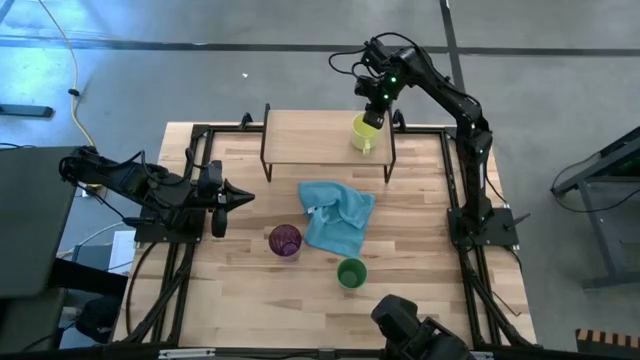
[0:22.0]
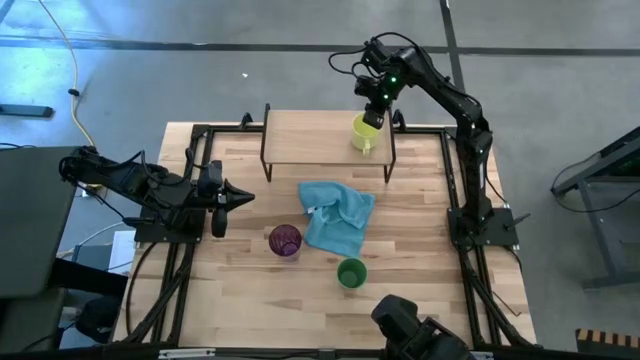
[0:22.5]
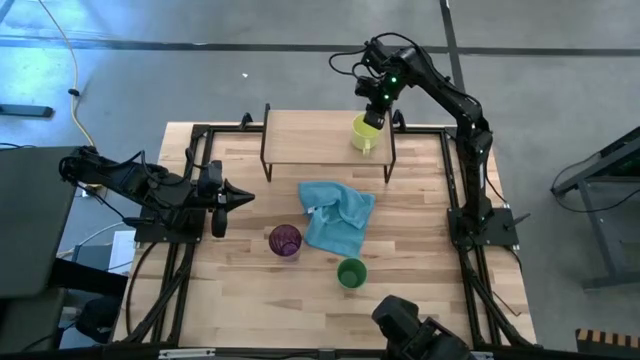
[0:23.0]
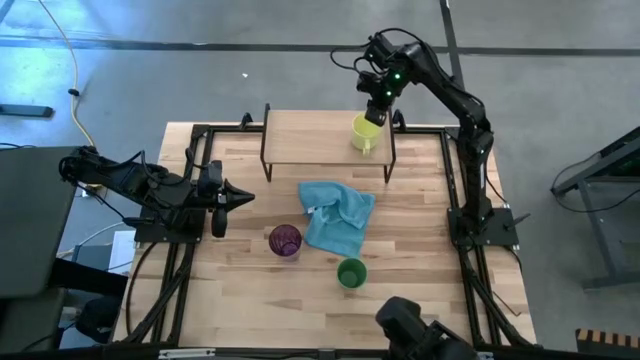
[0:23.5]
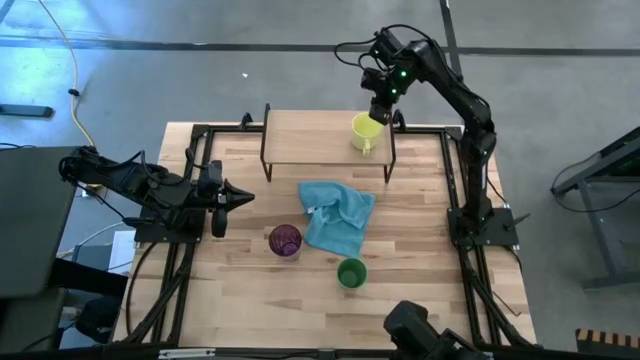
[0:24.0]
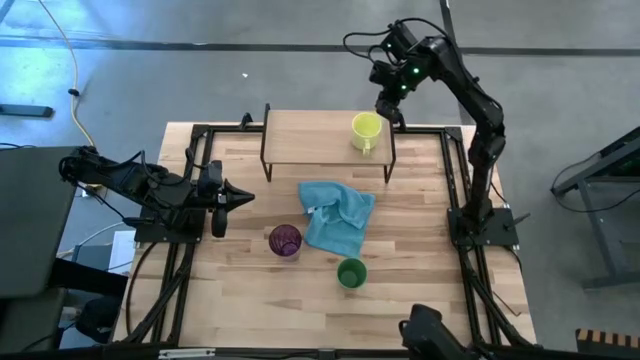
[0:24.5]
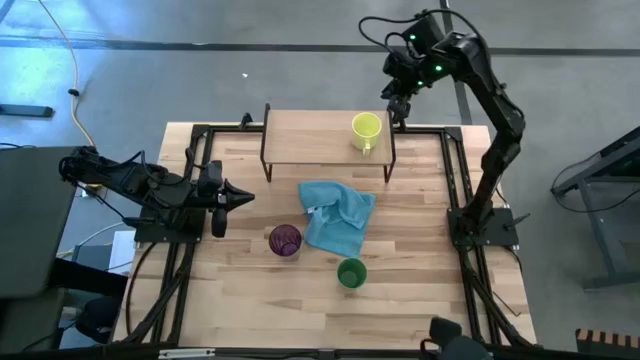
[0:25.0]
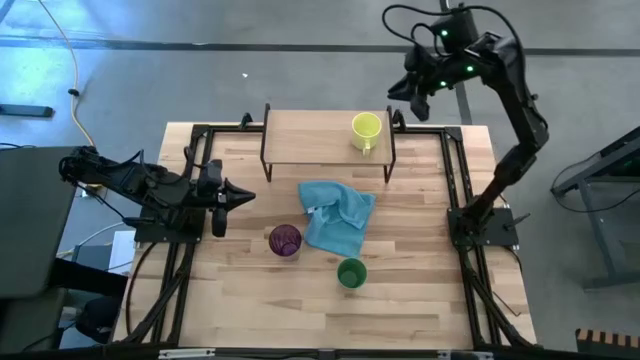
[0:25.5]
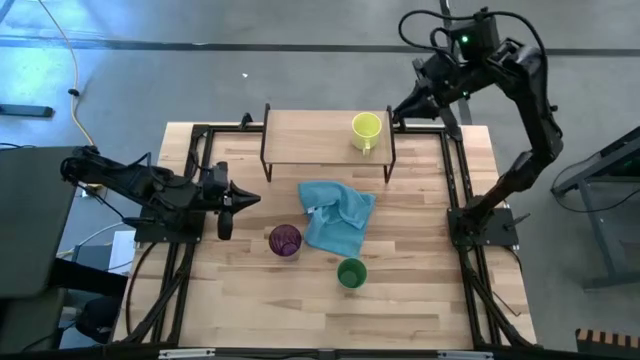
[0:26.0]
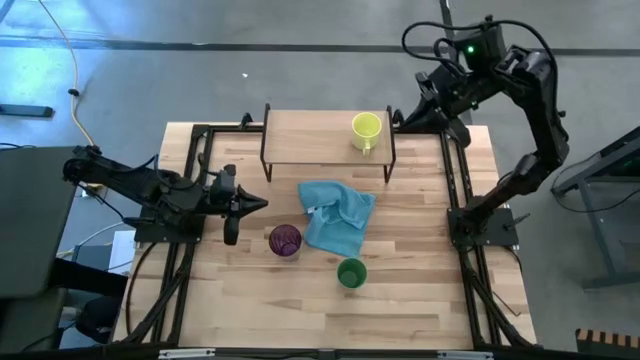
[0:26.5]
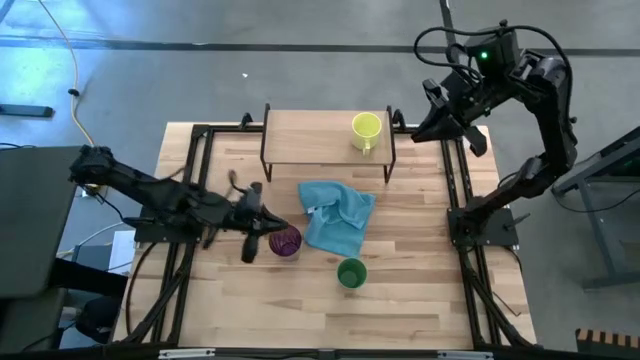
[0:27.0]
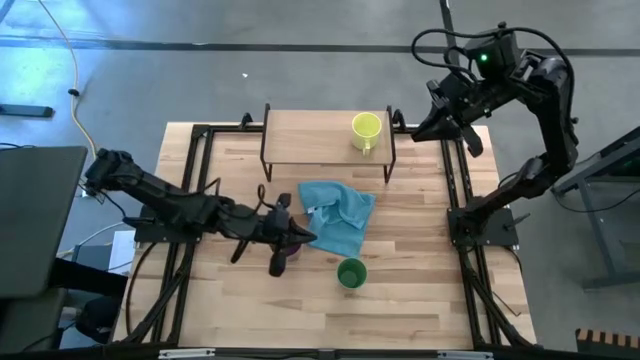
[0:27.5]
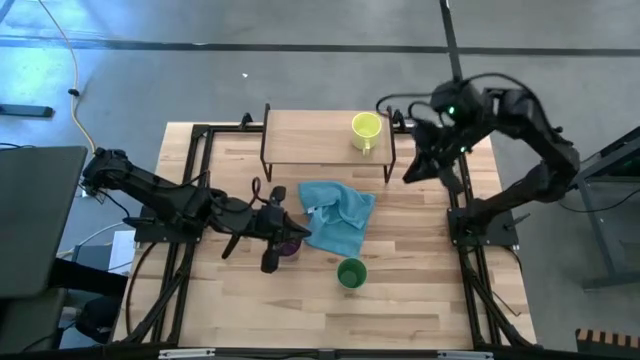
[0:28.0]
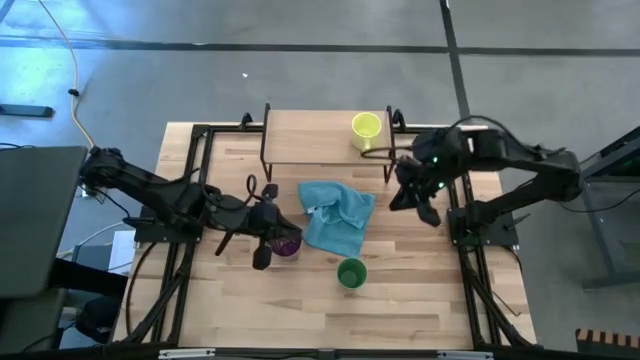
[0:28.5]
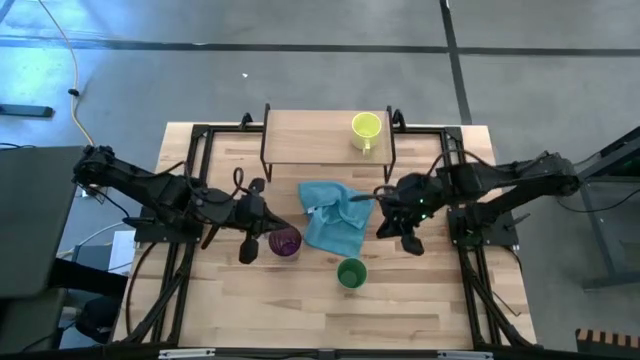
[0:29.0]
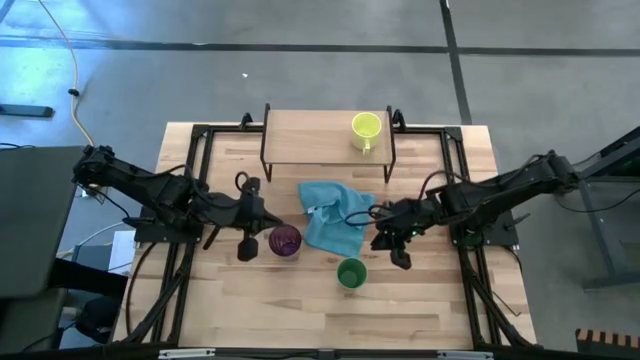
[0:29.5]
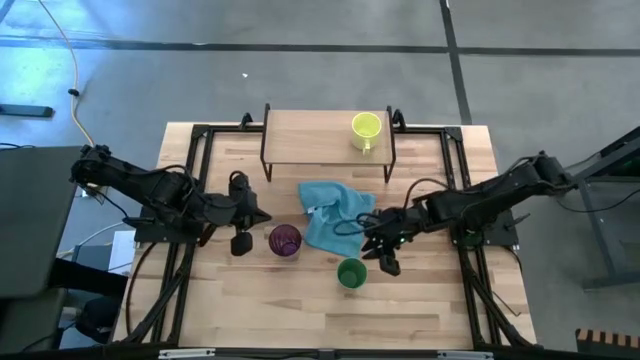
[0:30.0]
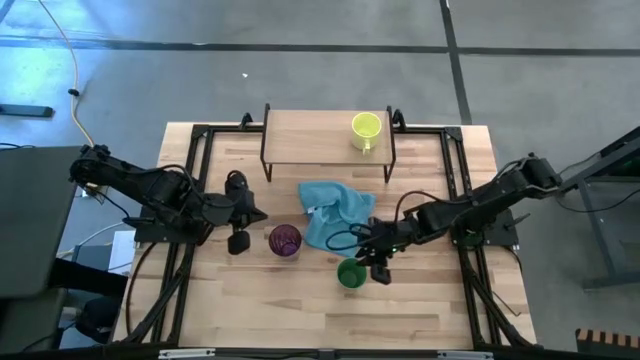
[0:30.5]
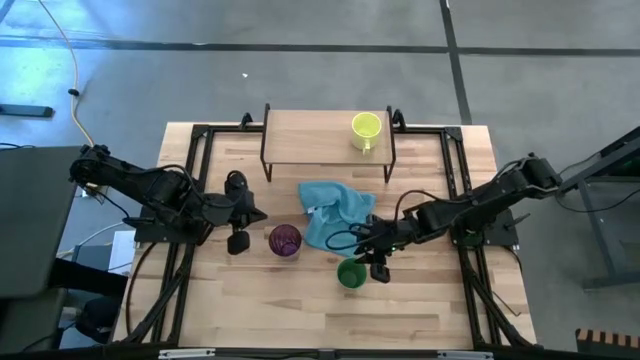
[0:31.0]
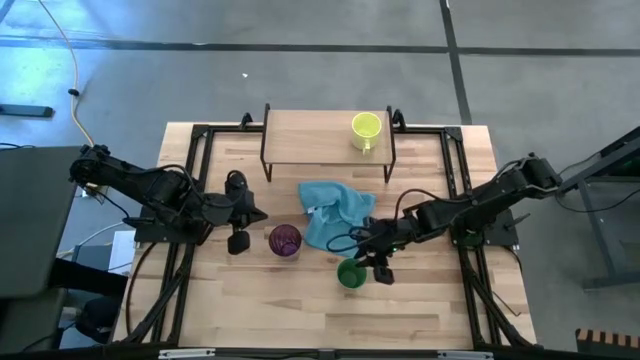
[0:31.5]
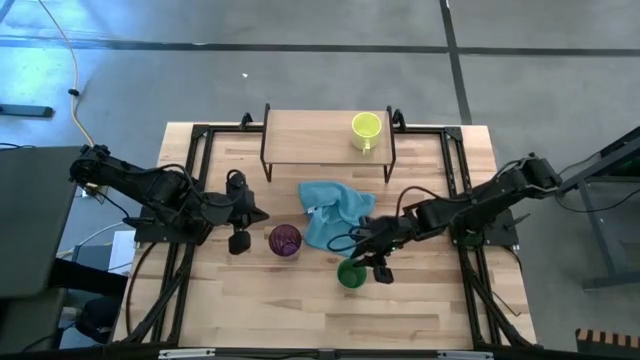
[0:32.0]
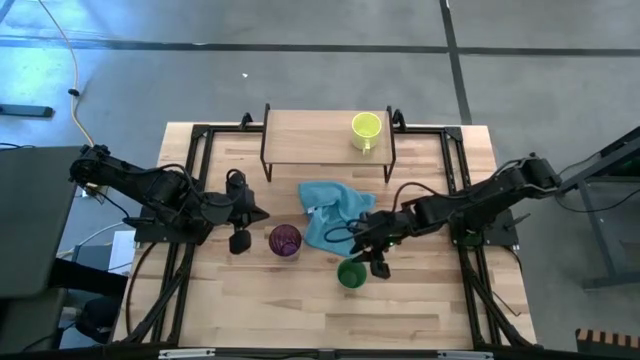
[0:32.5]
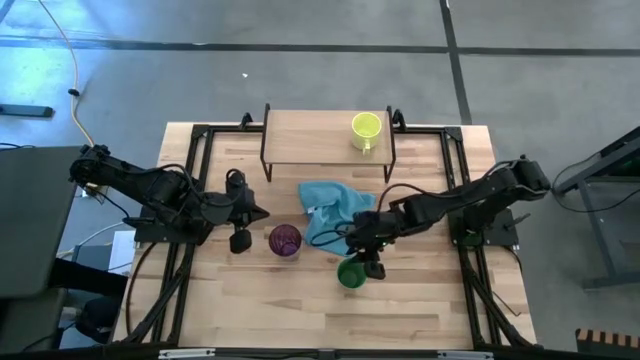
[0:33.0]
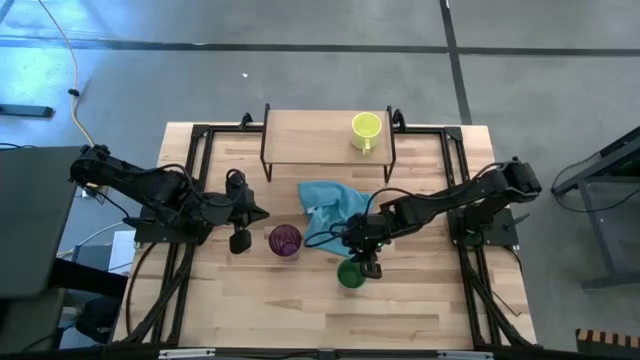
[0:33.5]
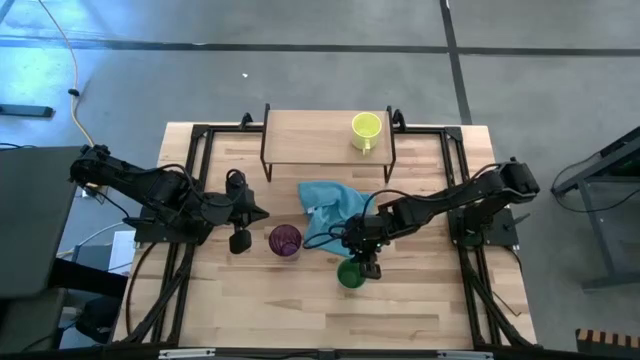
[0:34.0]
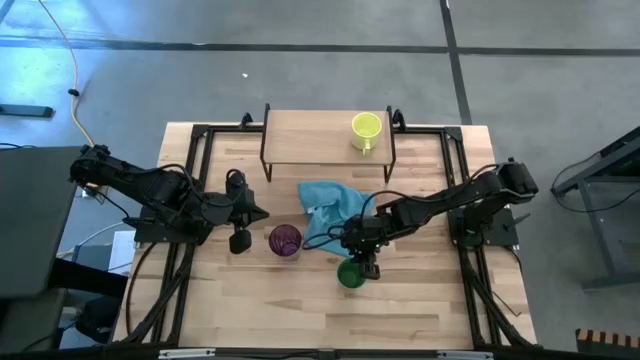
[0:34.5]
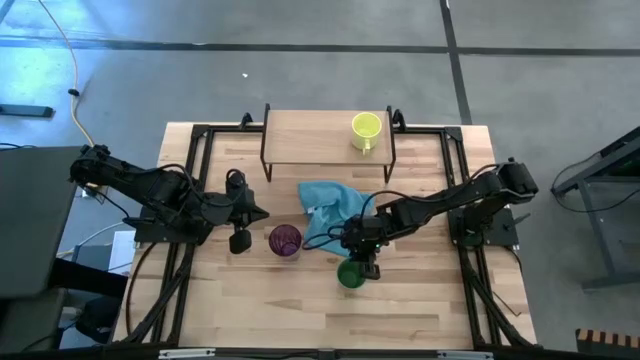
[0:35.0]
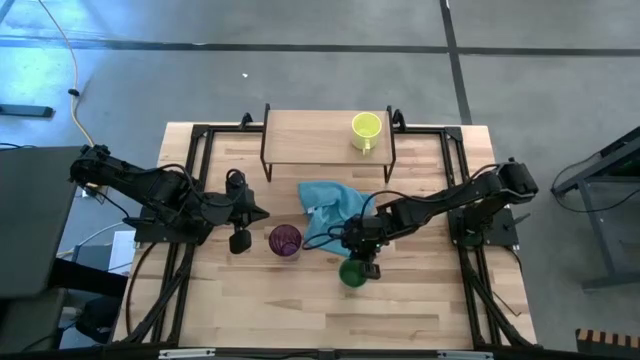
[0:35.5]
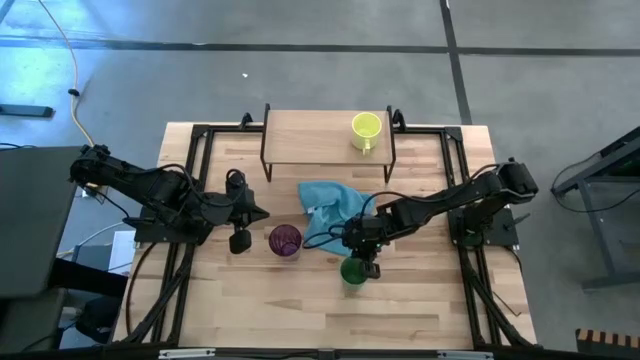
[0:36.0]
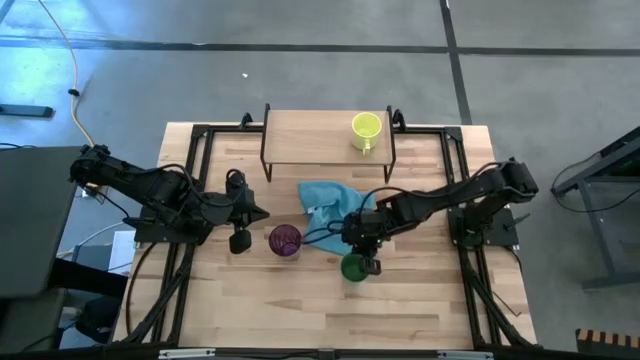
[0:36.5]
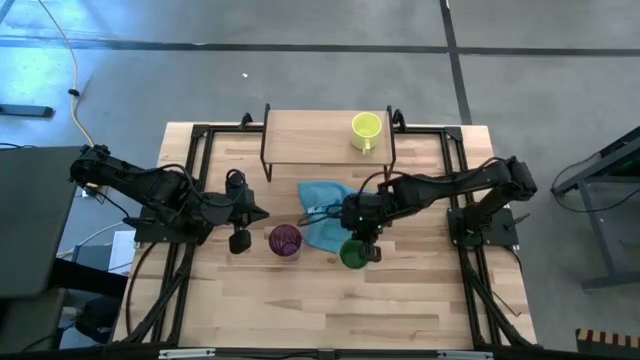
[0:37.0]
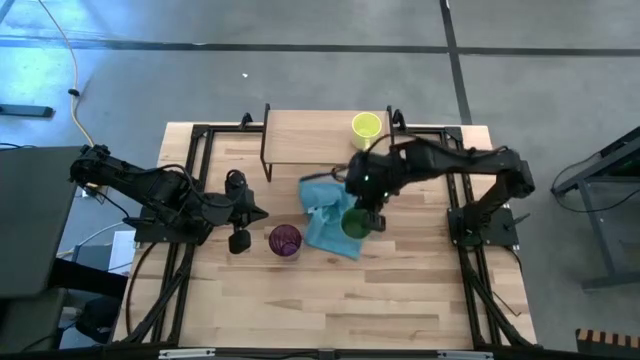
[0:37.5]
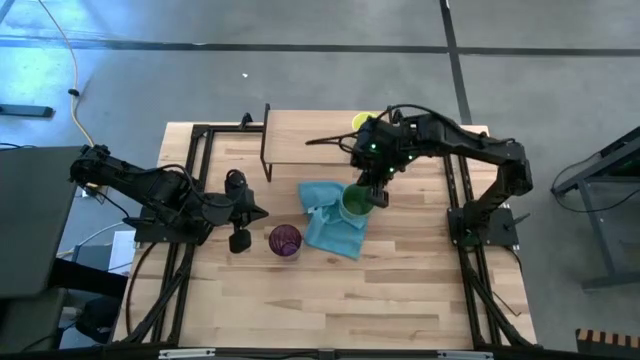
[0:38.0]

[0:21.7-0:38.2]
Task: Stack small to large cups/mugs on shelf
Put the green cup on the shelf

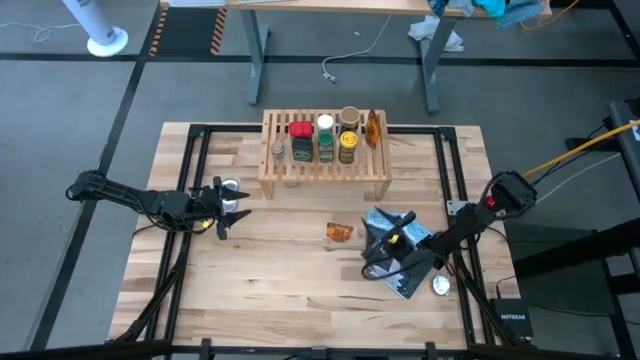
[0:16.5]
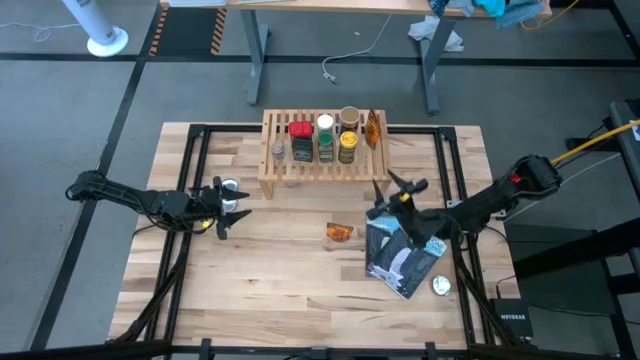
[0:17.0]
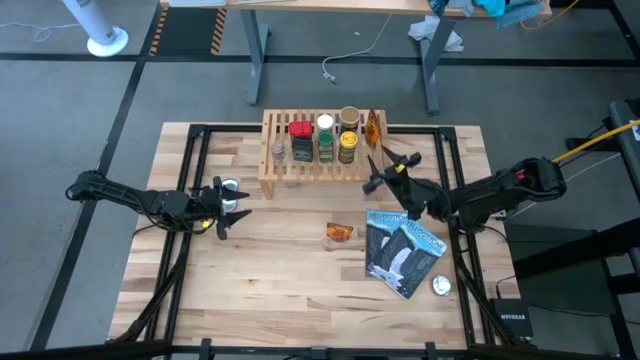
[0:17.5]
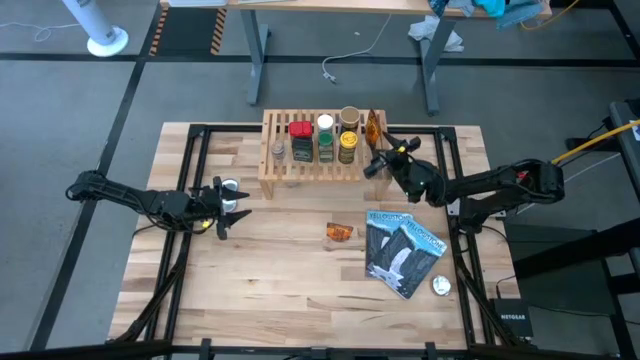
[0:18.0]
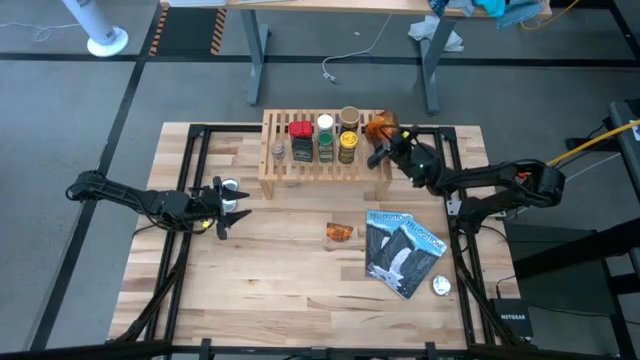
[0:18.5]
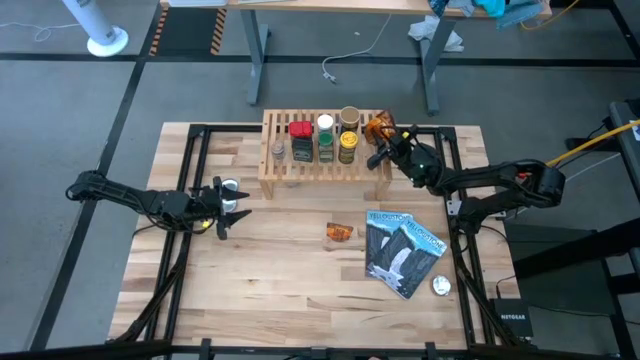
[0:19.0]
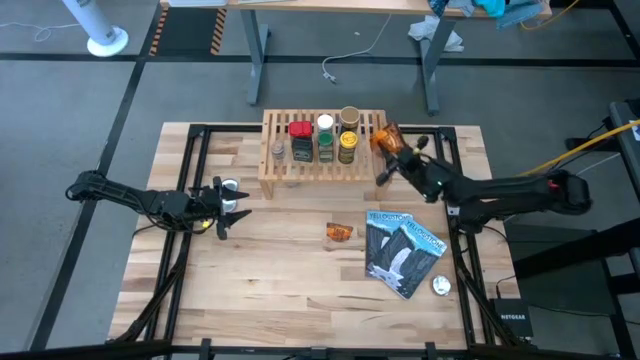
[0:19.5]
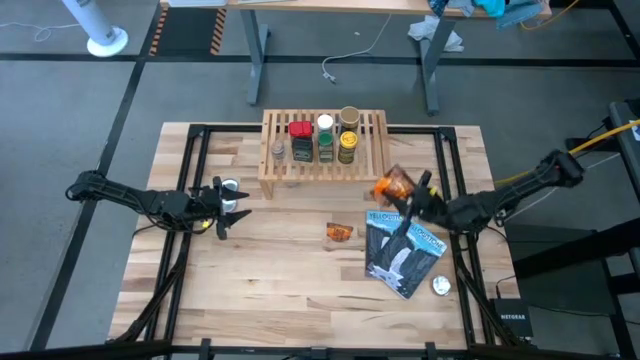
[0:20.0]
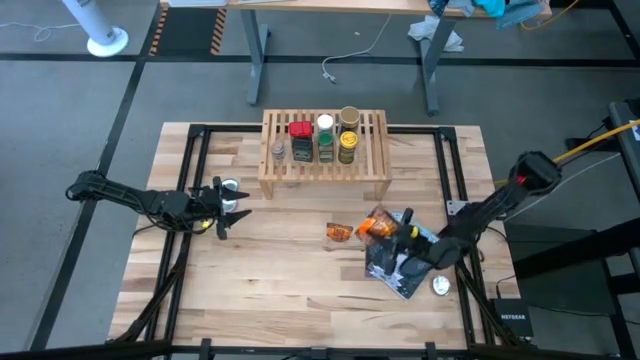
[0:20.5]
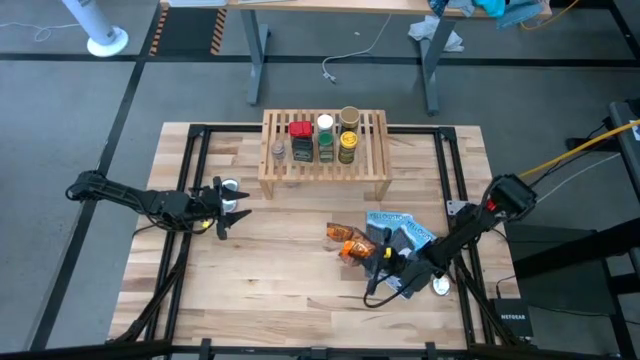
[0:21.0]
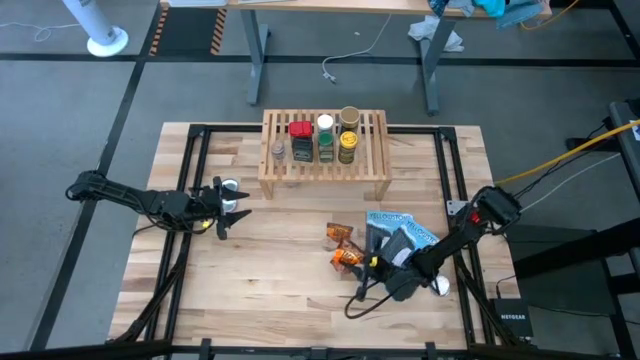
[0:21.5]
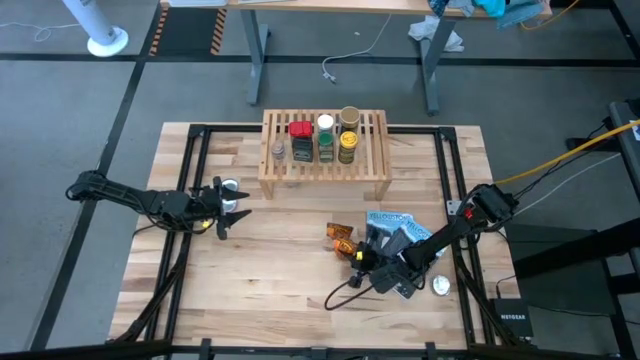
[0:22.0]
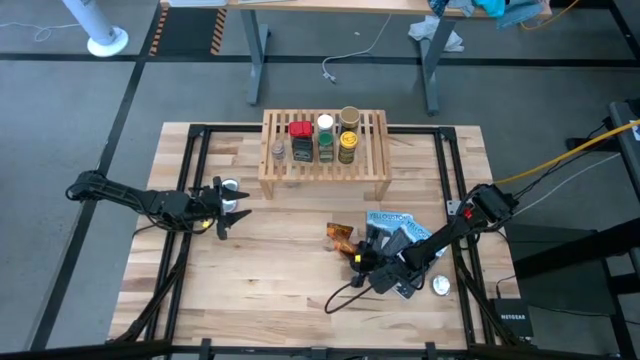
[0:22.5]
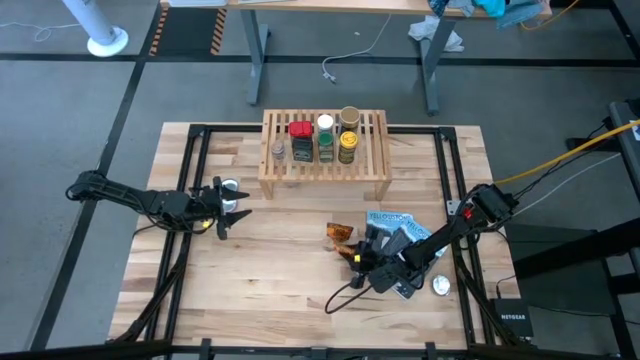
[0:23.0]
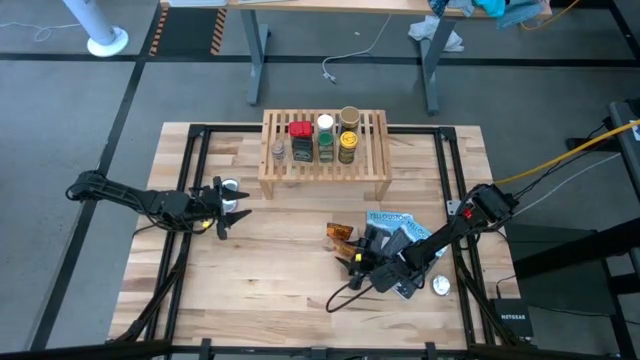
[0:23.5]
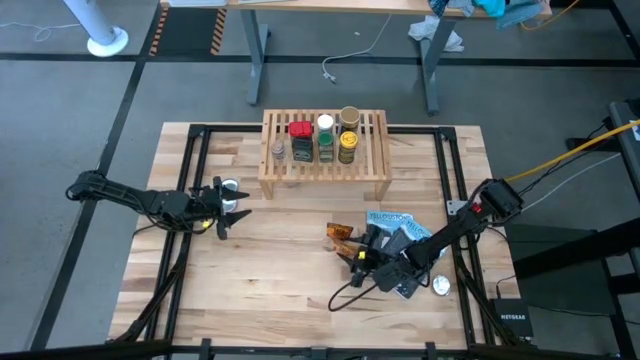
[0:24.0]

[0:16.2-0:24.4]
Task: Shelf spices
Remove the orange seasoning pack from the shelf
